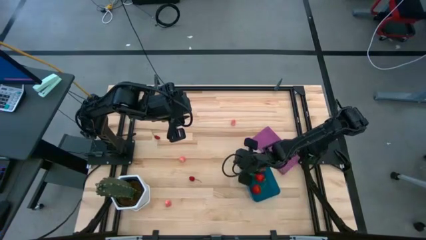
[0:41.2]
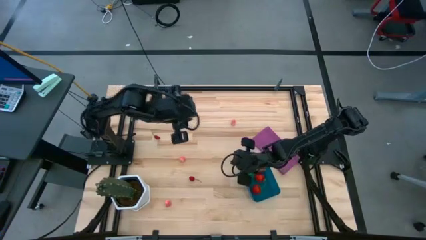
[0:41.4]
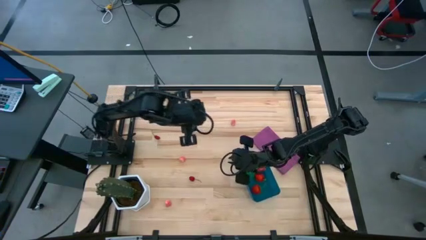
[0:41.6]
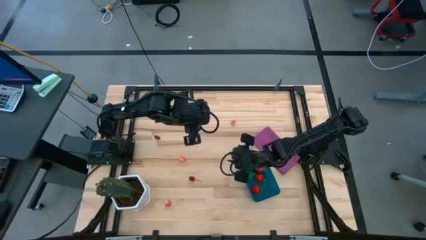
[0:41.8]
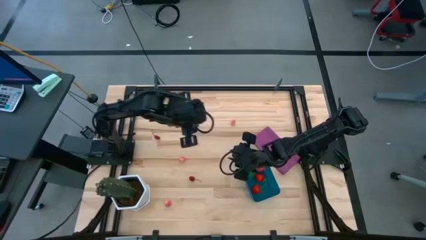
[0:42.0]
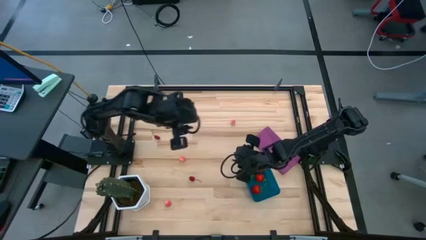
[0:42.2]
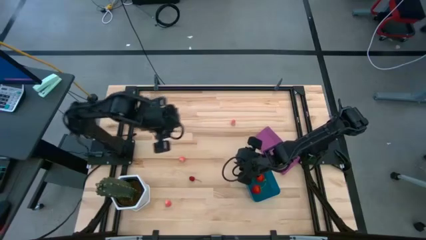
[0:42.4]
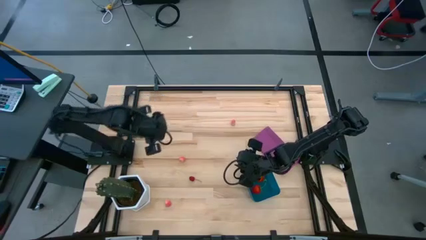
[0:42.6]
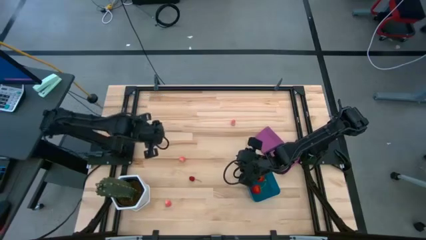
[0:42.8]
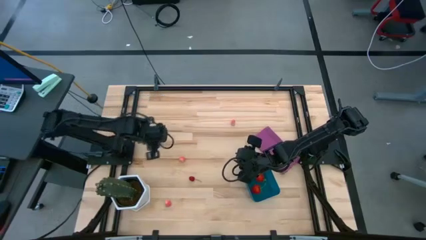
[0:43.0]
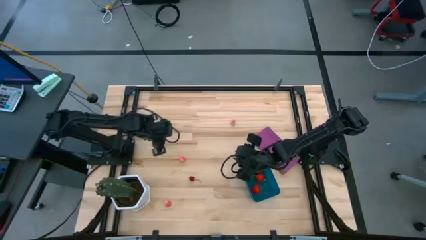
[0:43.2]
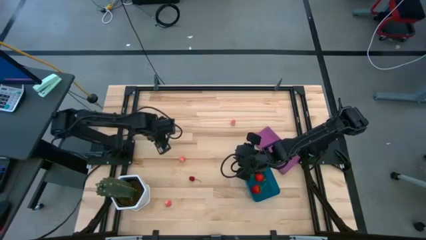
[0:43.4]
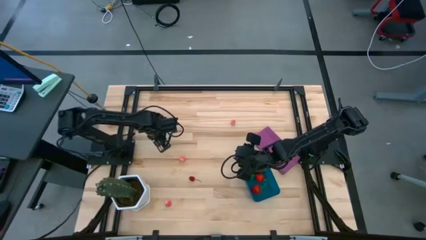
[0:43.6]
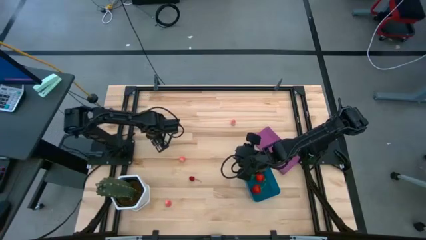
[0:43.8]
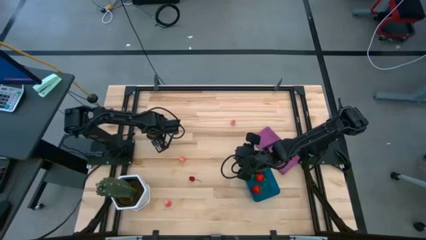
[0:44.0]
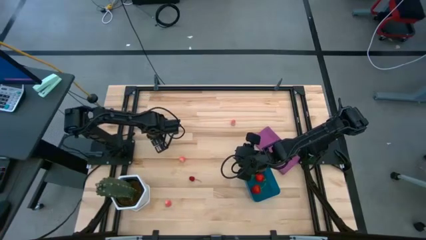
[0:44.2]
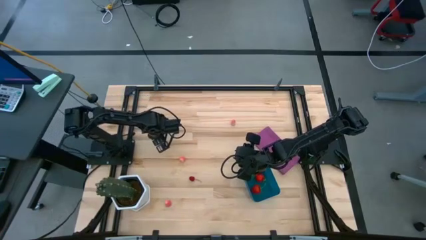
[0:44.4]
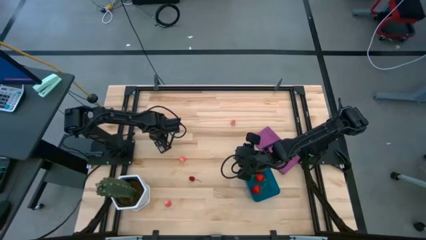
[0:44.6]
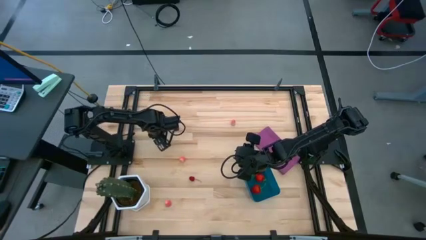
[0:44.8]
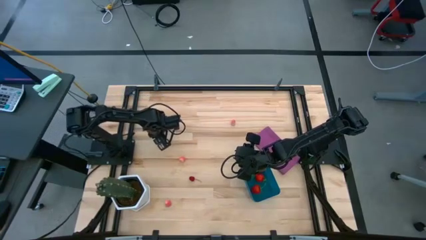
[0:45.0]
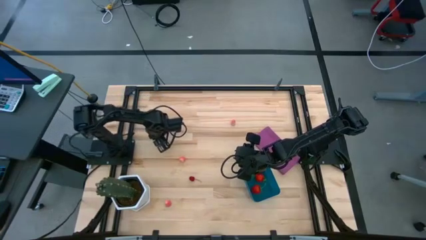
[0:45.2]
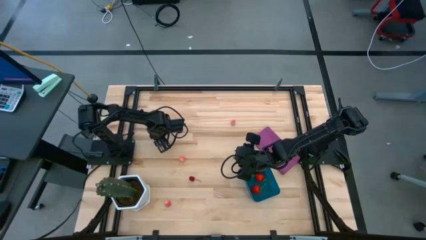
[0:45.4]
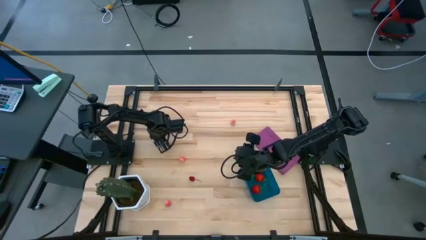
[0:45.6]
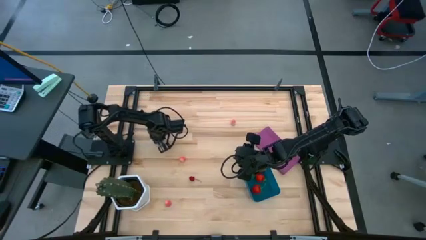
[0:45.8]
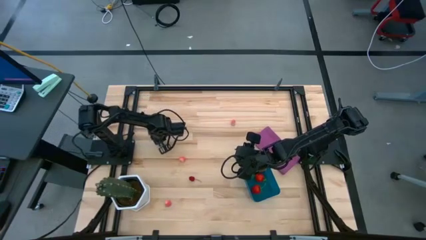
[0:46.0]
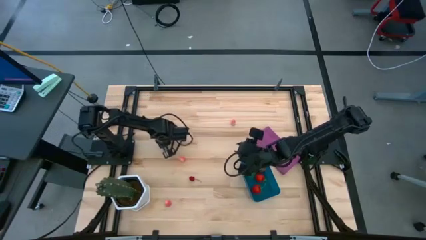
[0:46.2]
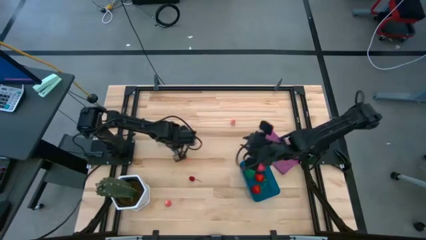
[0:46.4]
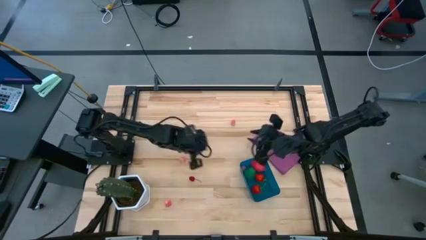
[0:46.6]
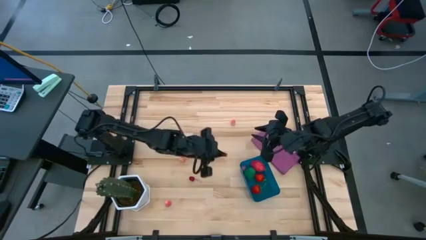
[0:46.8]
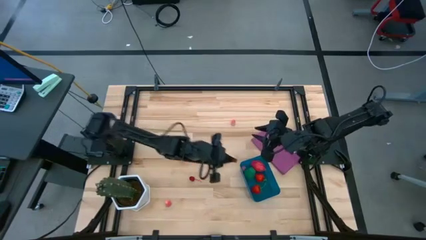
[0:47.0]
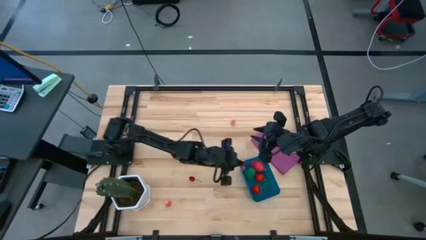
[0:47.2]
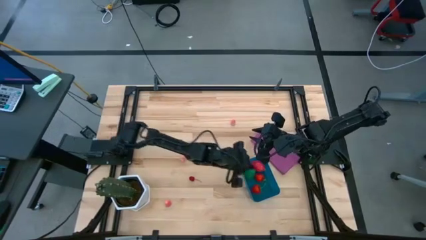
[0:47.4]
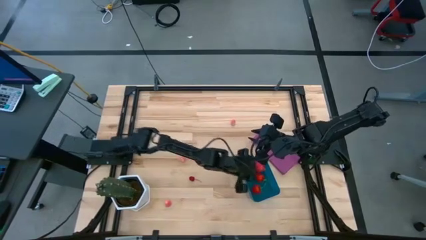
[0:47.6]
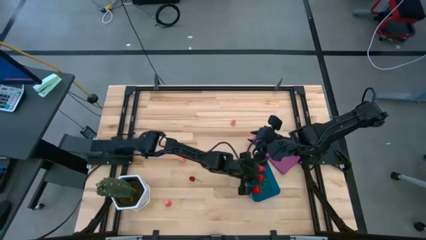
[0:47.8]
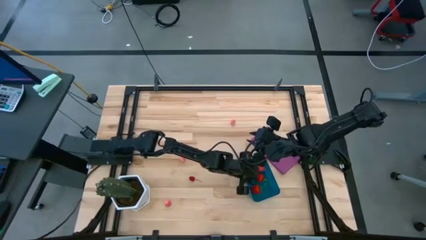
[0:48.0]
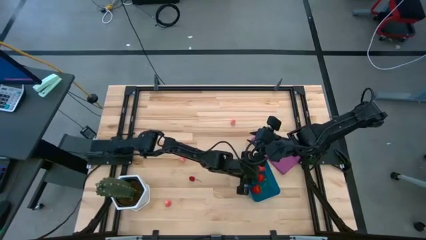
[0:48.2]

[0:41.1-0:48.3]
Task: Pick and placing Produce into tupperware
Put the red cherry into the blue bin

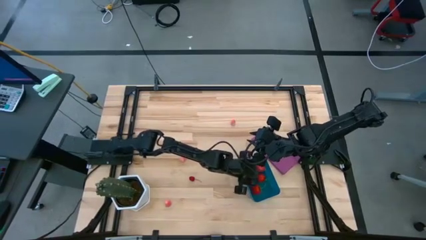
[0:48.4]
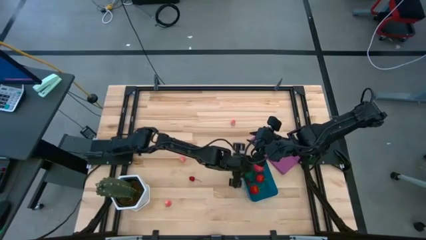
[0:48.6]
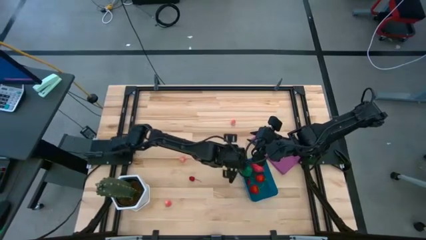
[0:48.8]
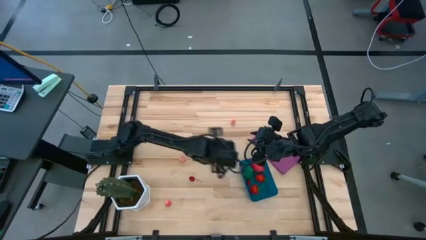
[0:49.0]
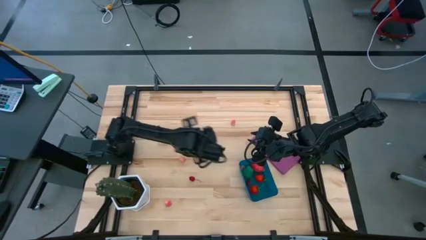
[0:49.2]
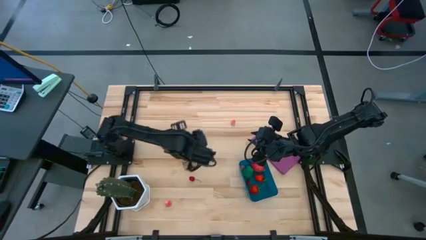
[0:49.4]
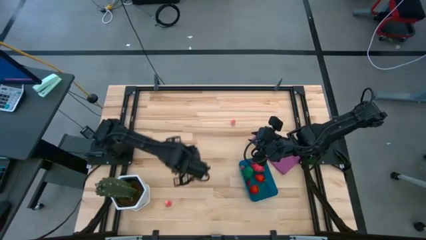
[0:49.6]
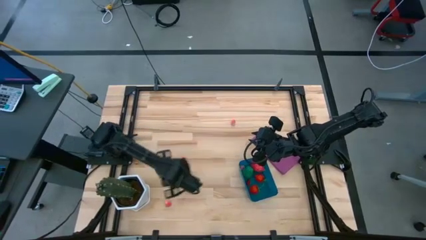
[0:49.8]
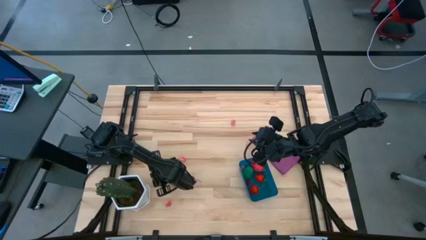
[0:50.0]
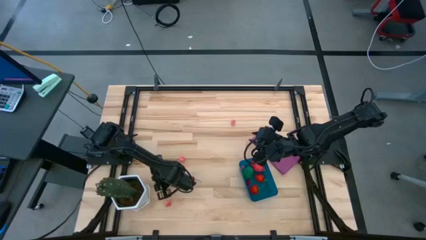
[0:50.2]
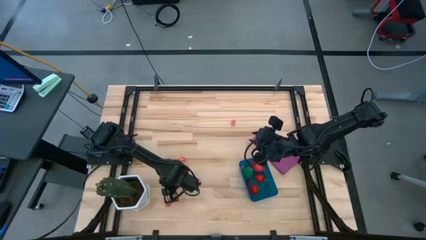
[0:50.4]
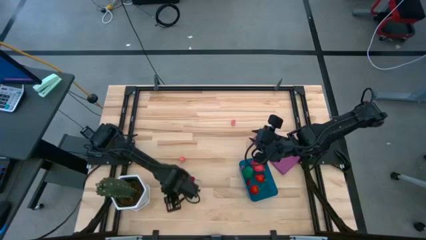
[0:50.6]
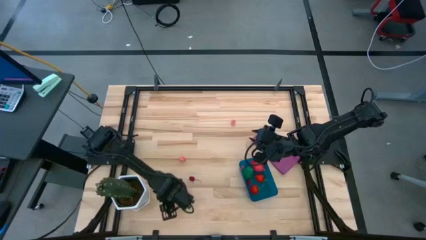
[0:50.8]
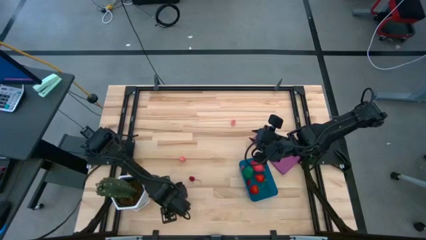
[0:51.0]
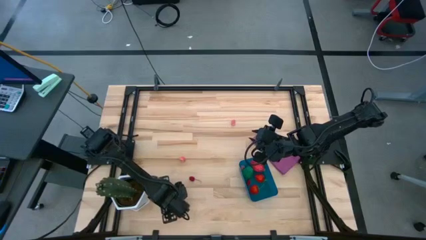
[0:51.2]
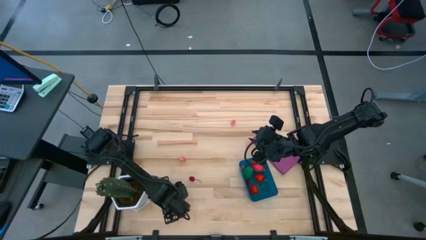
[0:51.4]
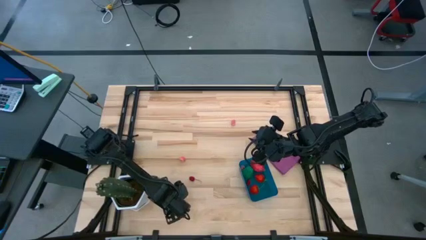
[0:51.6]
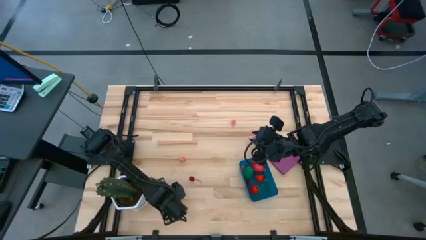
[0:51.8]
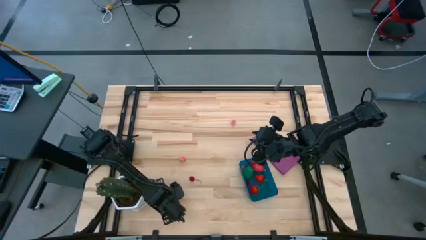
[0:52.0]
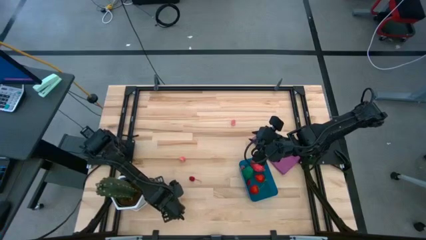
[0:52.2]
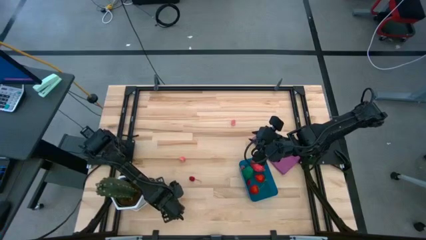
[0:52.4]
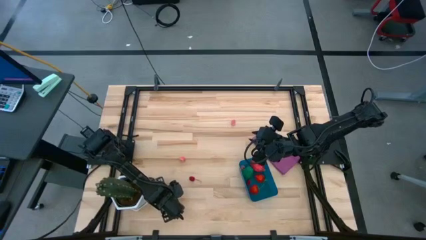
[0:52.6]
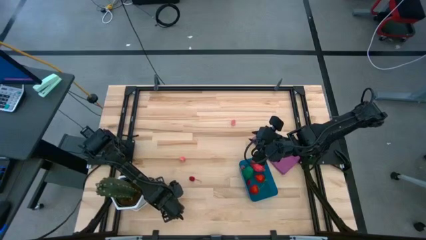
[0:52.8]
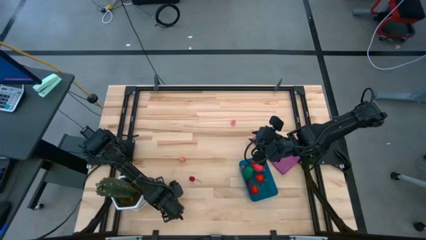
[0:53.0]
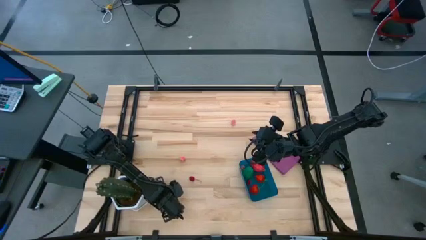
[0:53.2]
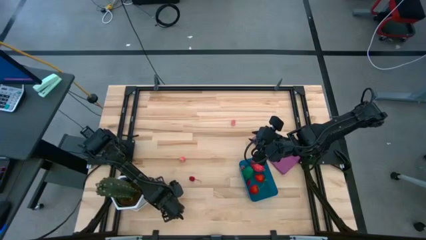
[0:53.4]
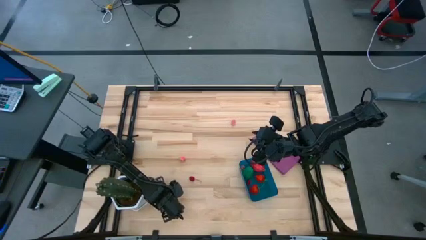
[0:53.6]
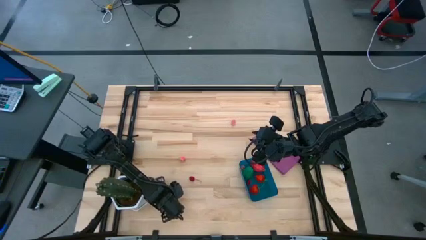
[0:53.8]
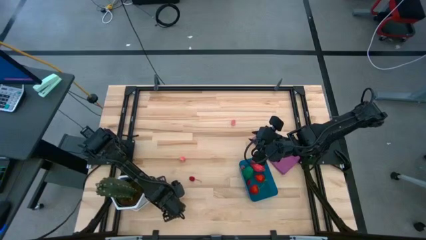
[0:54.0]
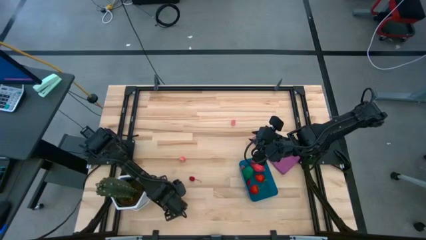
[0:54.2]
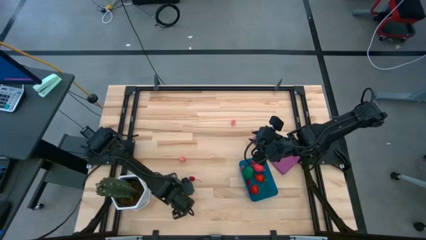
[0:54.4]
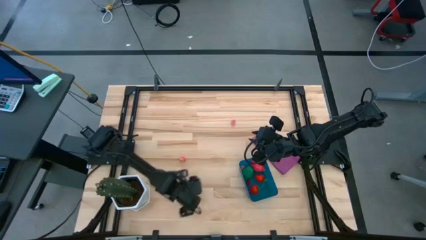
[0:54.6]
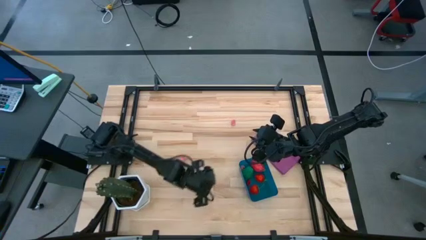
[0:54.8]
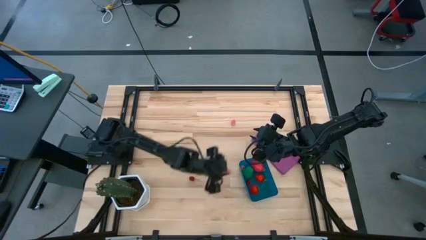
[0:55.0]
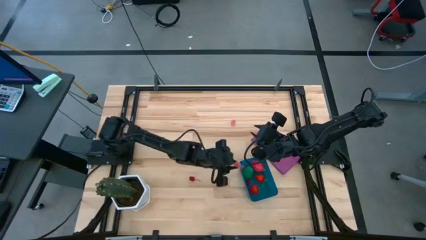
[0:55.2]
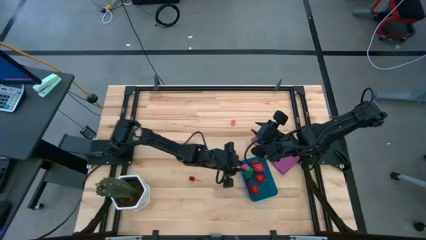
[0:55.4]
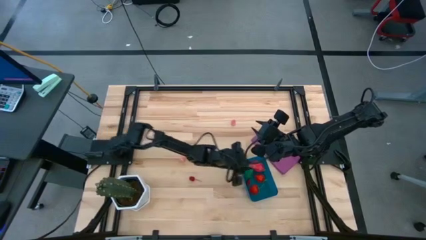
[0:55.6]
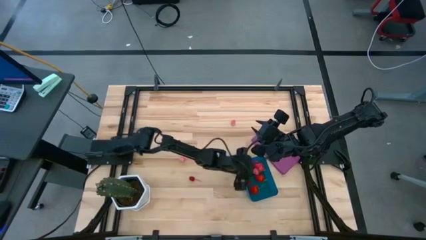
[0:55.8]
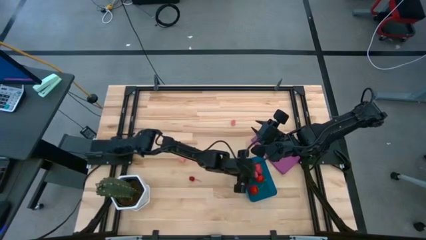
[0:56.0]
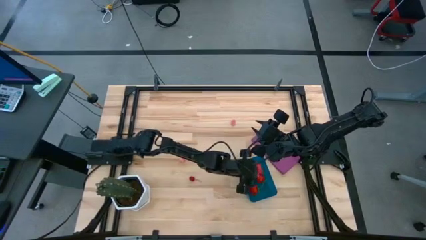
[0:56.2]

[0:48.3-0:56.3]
Put the pink peach into the blue bin

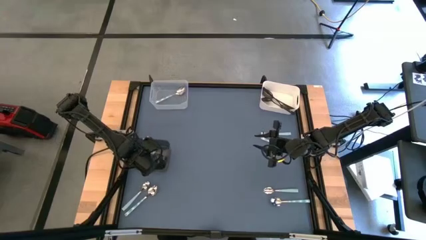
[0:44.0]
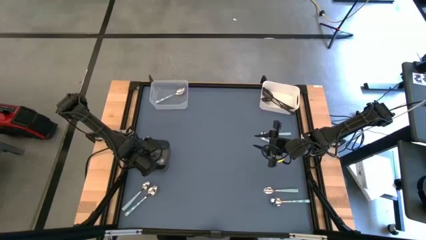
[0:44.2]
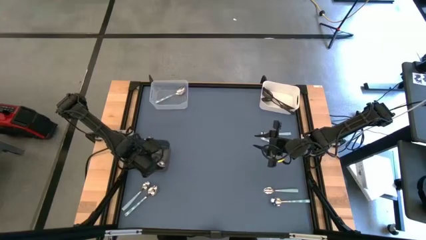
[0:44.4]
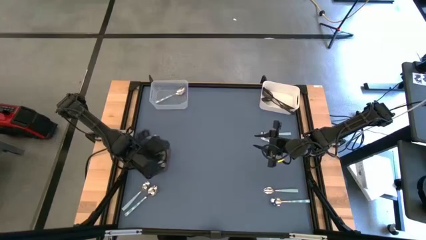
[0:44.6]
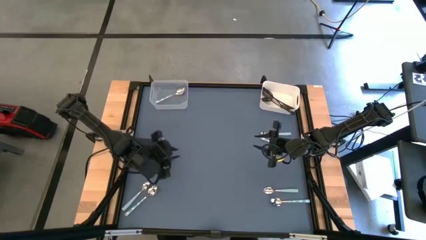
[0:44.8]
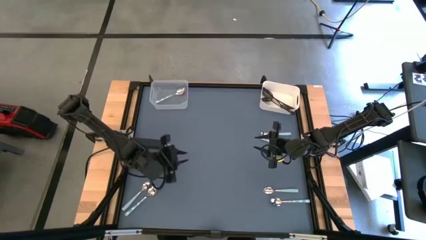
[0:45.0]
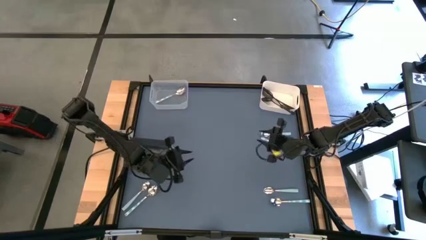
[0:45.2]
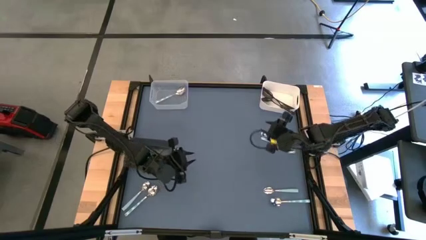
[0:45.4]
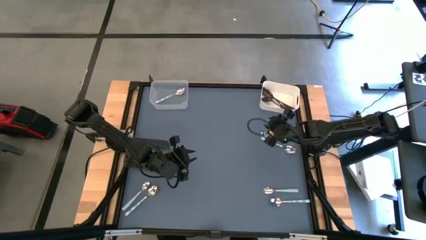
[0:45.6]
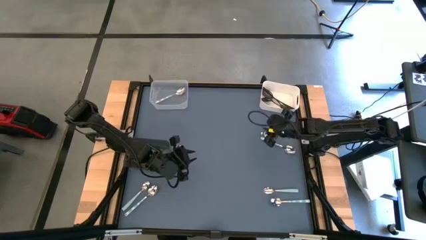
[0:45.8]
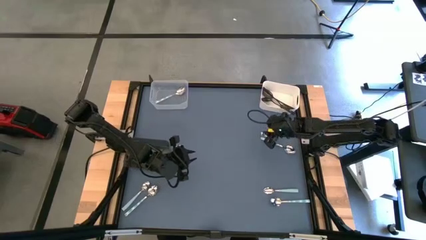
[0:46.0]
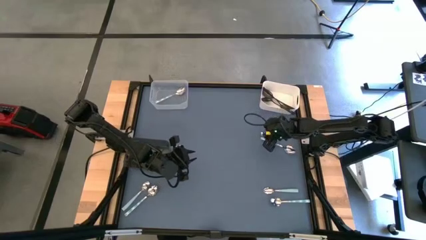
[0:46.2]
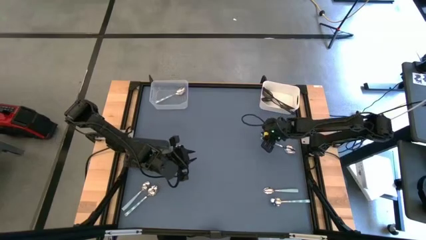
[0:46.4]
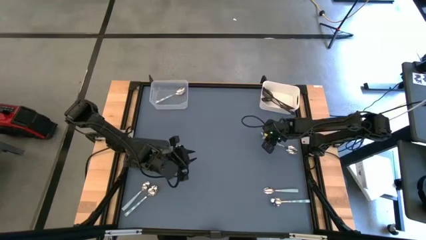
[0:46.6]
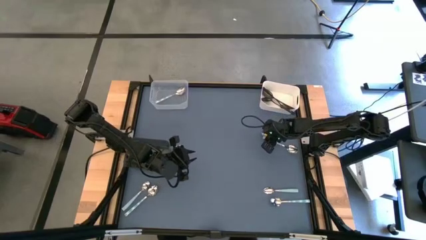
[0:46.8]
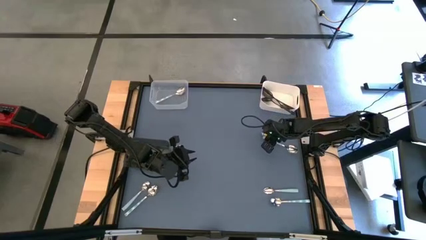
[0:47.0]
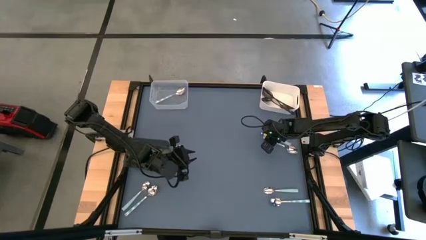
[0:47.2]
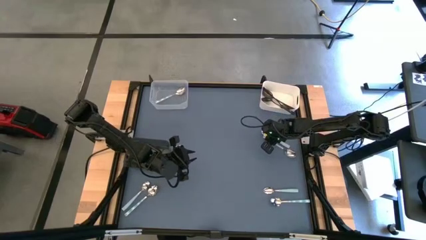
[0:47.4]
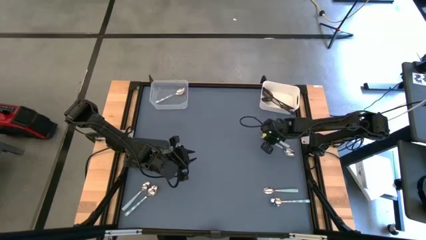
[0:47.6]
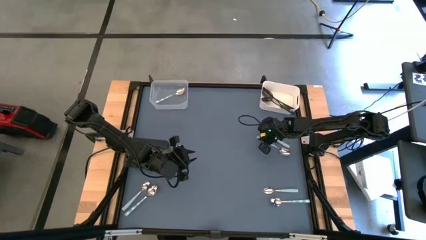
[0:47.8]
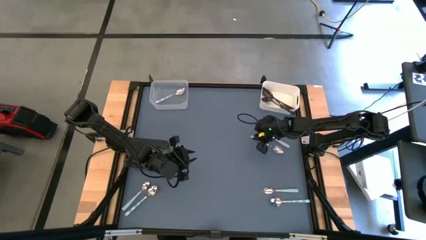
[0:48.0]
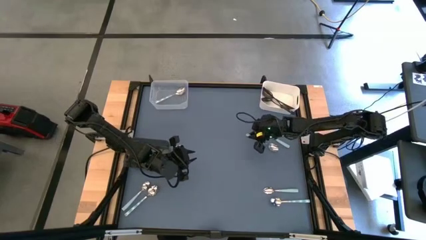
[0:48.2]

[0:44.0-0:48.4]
Task: Sort silverware by color (type)
Put the green spoon into the transparent bin
